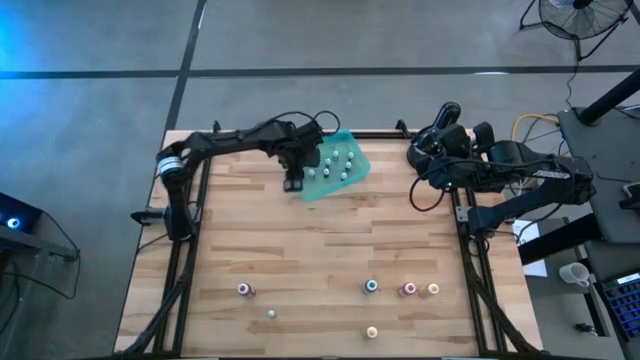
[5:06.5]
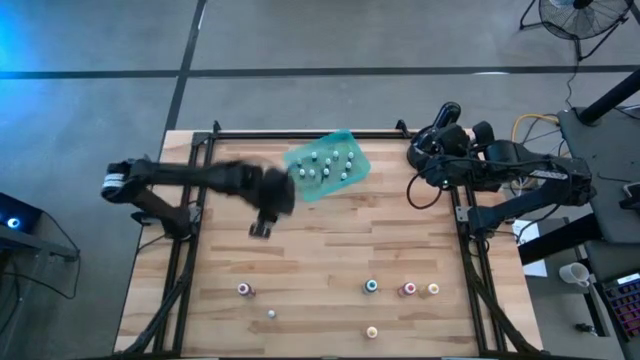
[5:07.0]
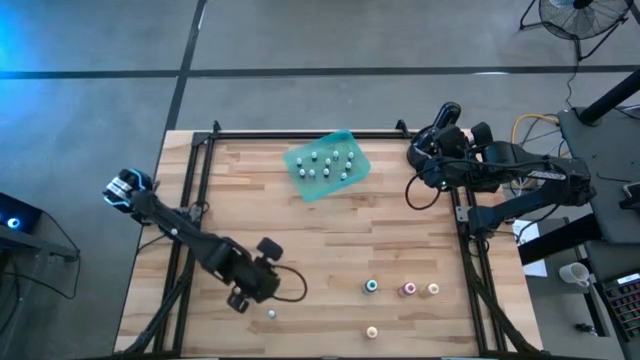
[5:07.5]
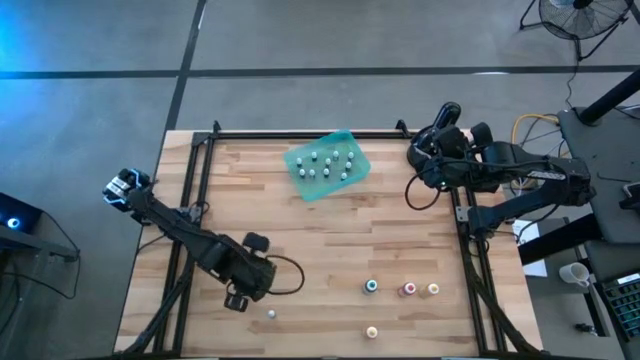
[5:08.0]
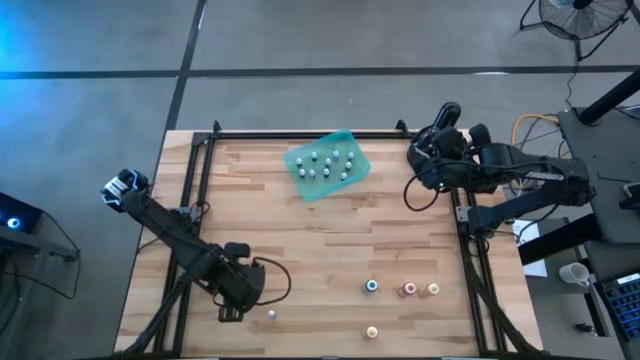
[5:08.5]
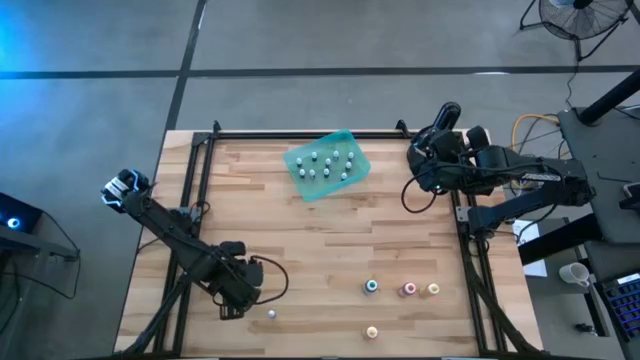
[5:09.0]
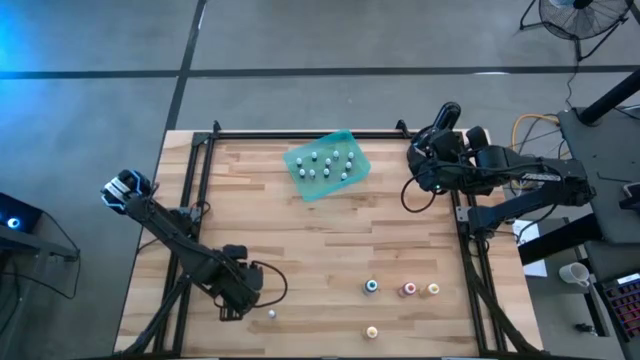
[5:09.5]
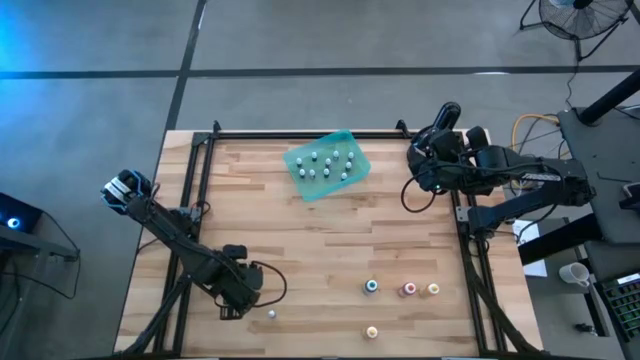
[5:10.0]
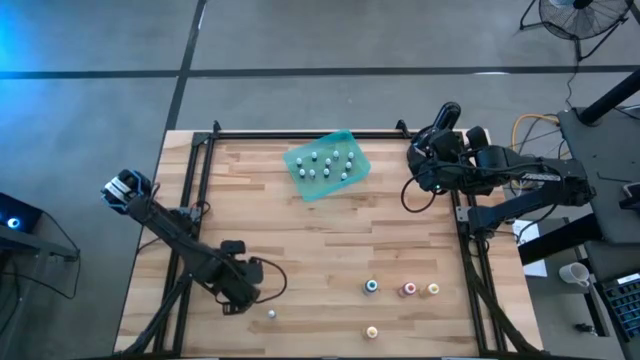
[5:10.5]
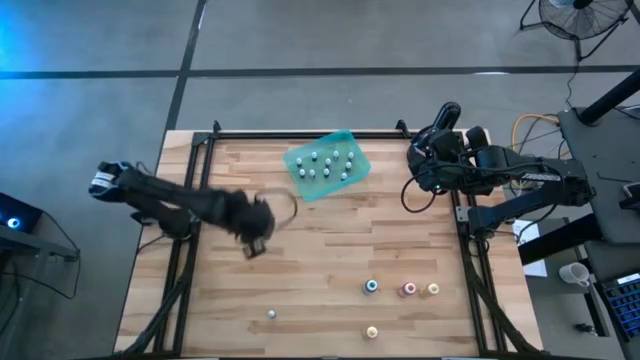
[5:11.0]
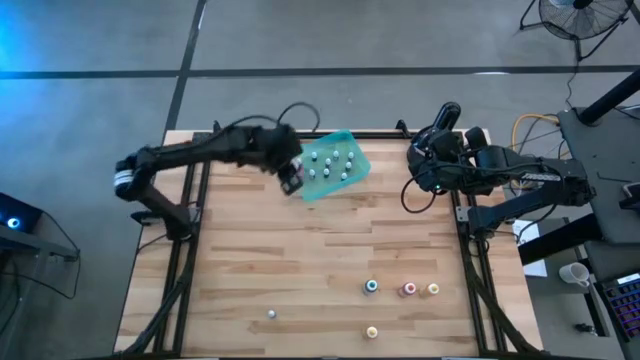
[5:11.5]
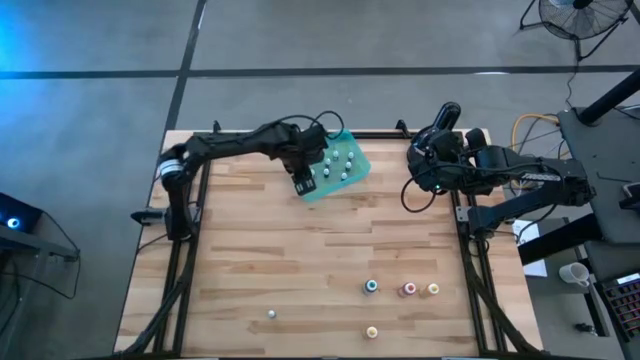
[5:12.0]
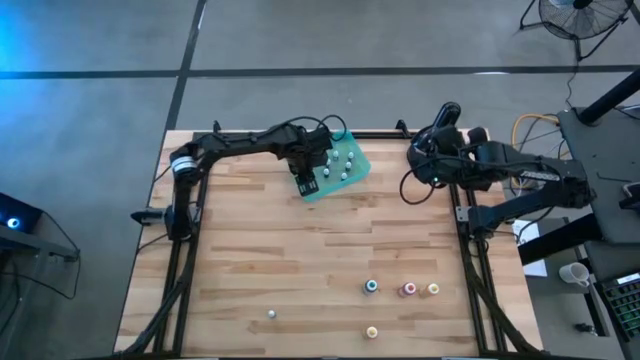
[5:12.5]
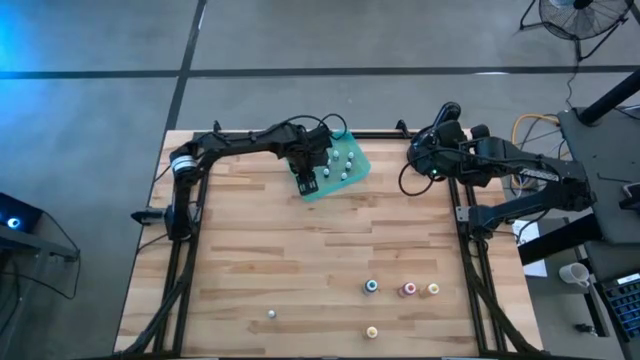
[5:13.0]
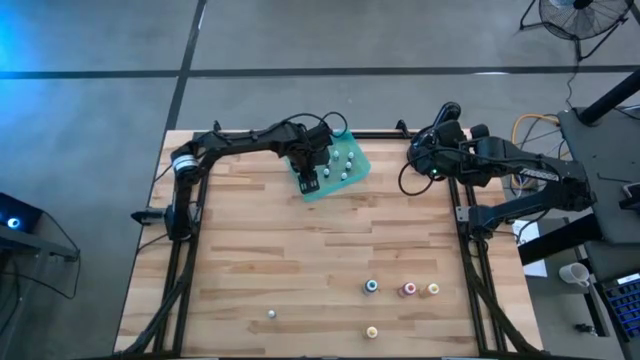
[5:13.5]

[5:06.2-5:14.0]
Task: Pick & Place food coloring
Put the orange small food coloring into the green bin

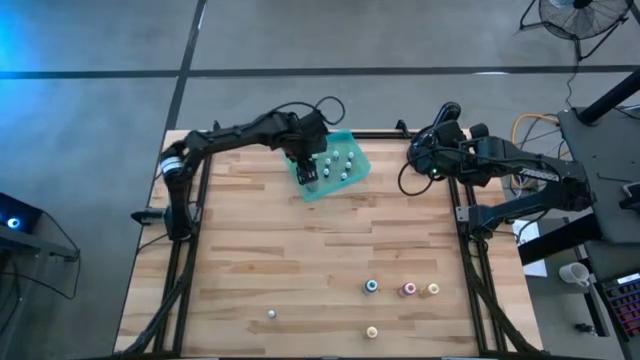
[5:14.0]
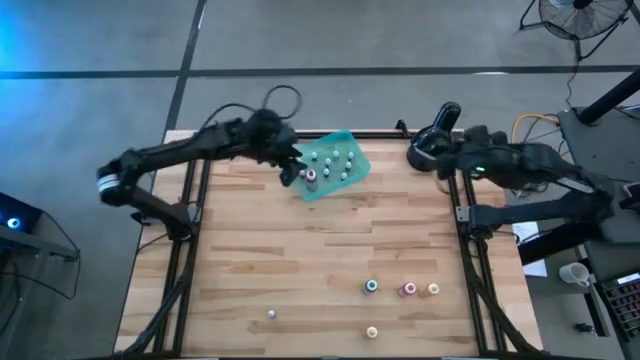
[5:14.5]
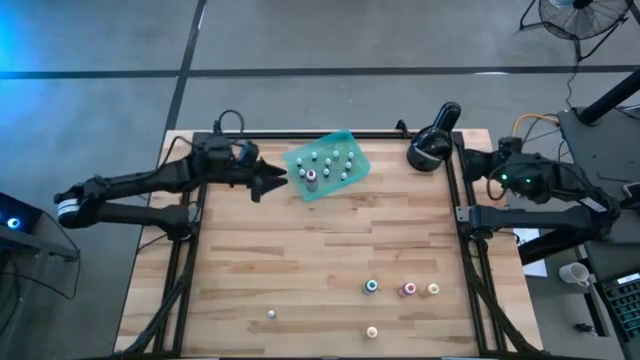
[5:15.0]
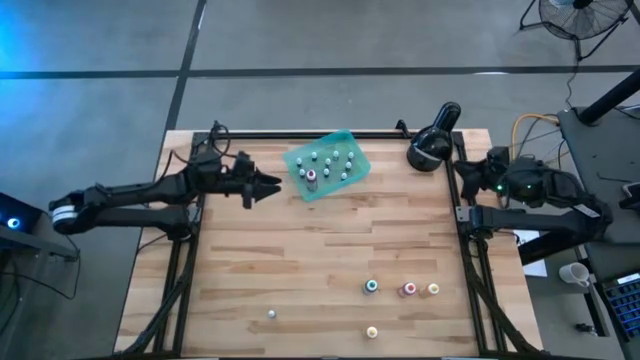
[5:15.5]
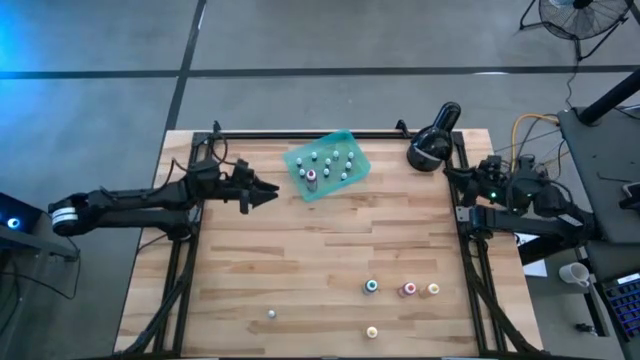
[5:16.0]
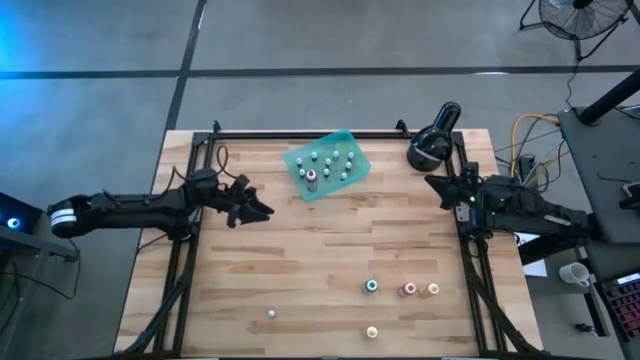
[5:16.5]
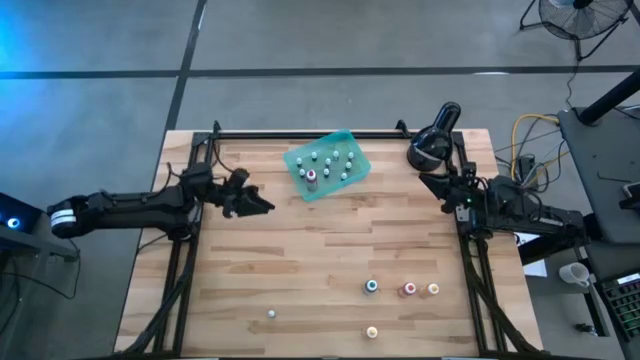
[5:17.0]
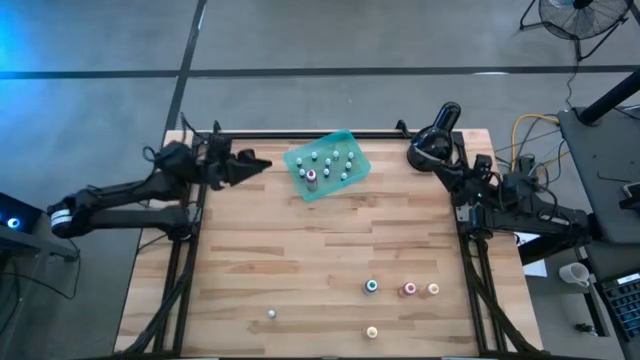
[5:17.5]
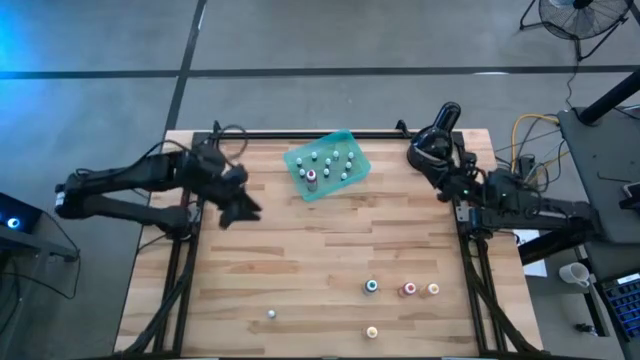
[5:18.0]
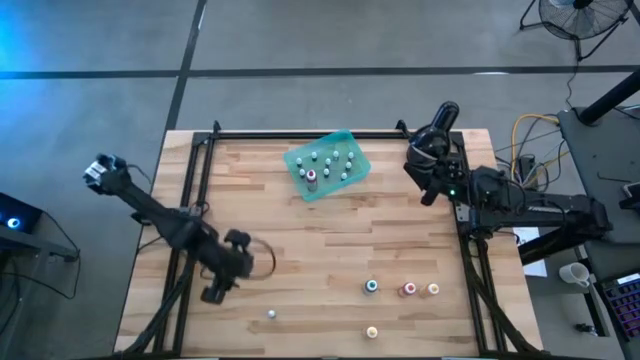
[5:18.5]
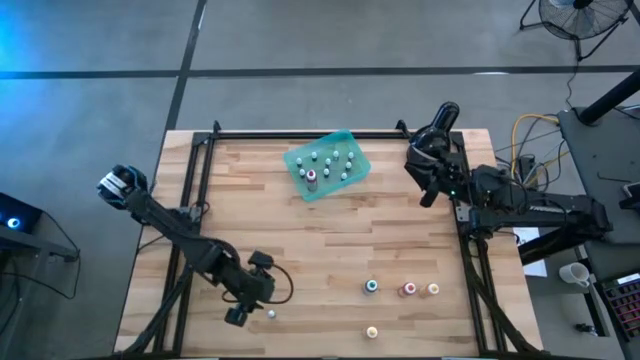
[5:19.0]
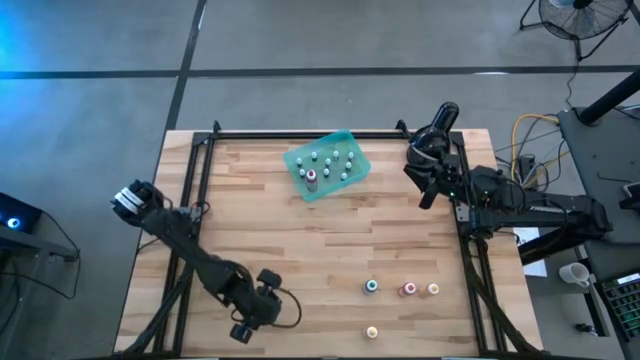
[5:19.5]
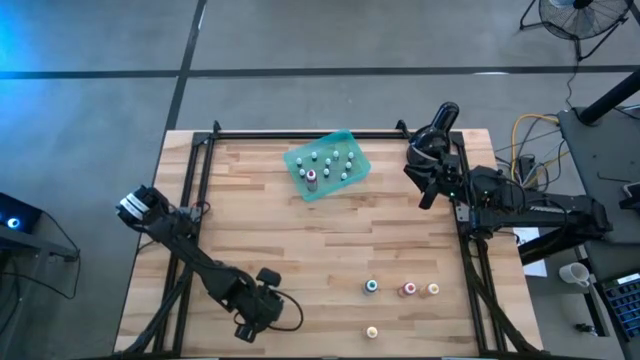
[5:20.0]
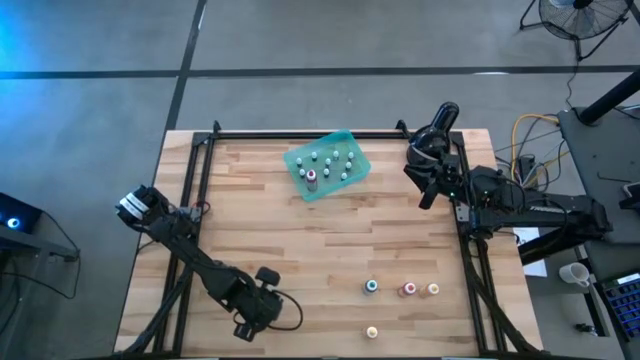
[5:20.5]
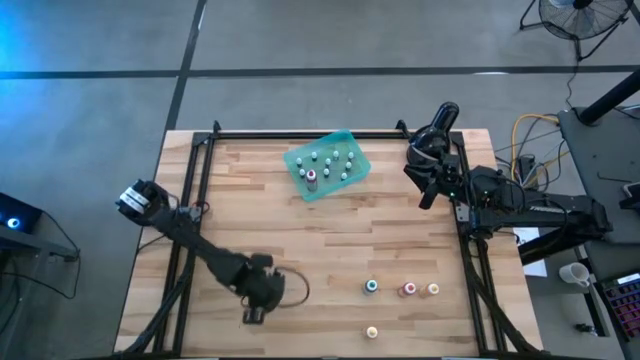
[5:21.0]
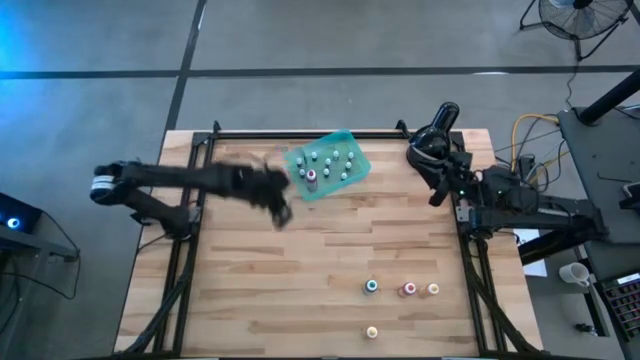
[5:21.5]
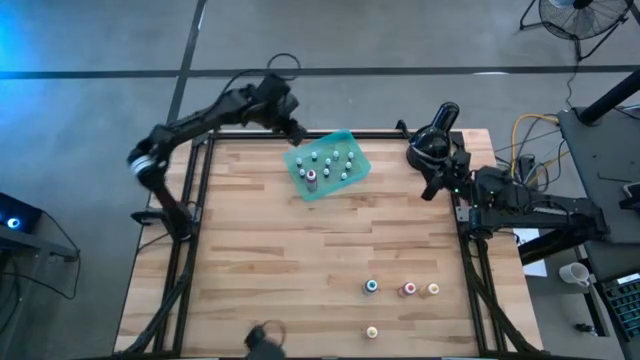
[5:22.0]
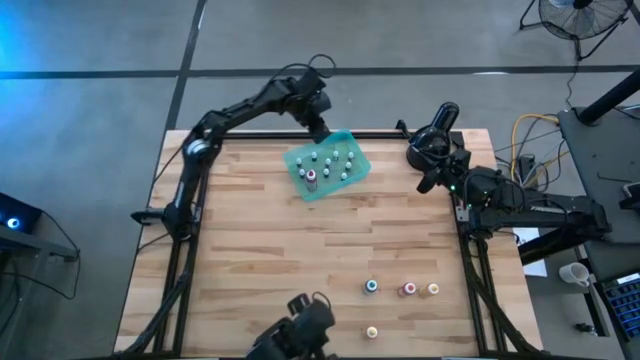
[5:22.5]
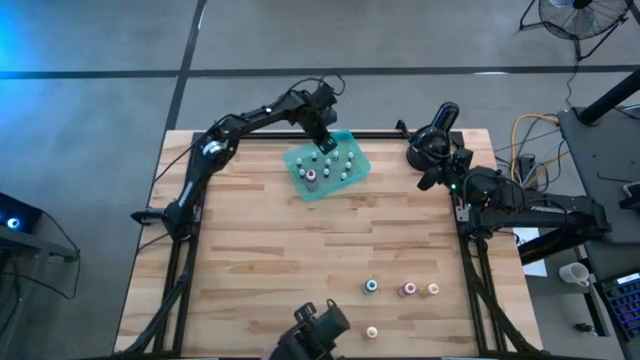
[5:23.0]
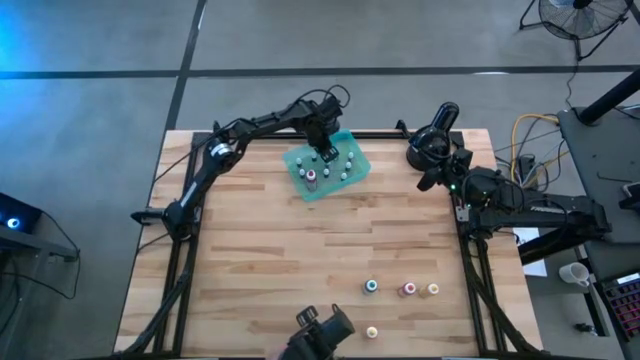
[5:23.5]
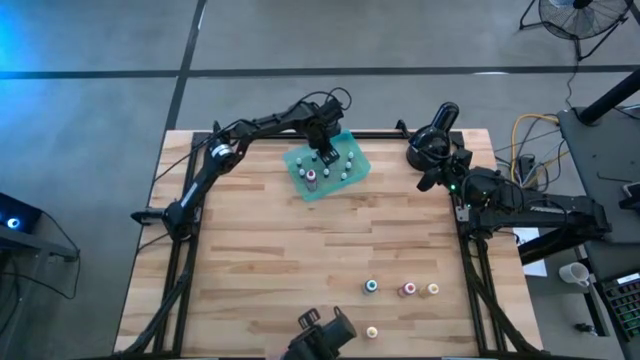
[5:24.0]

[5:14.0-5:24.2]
Put the red big food coloring into the green bin

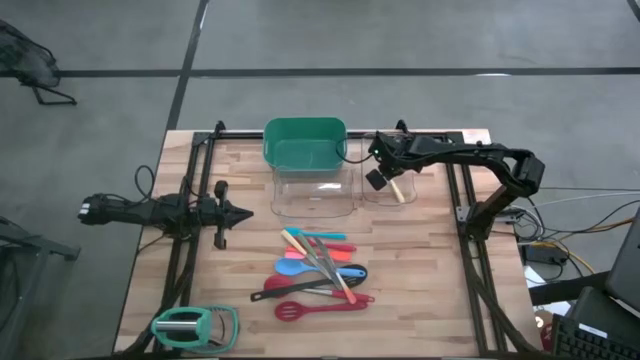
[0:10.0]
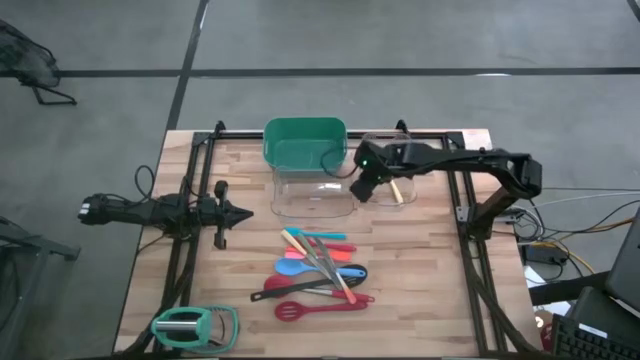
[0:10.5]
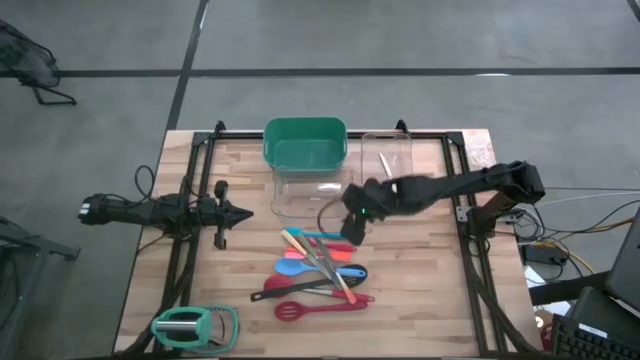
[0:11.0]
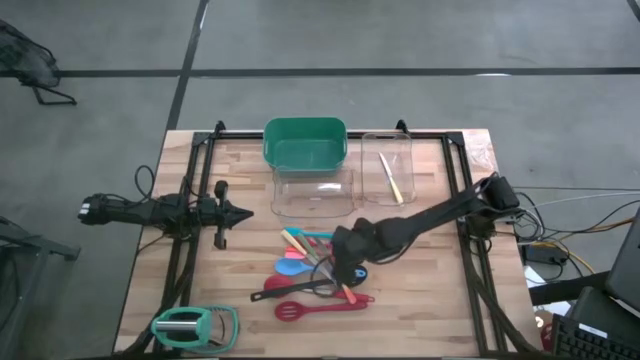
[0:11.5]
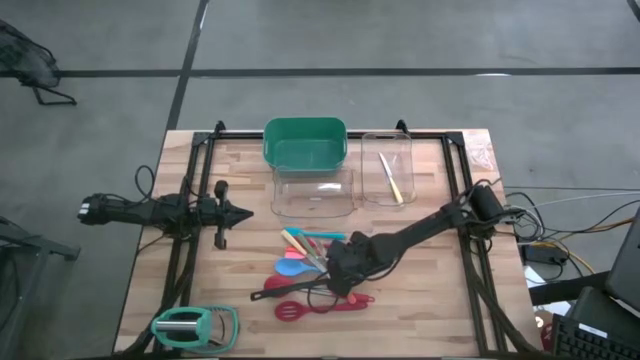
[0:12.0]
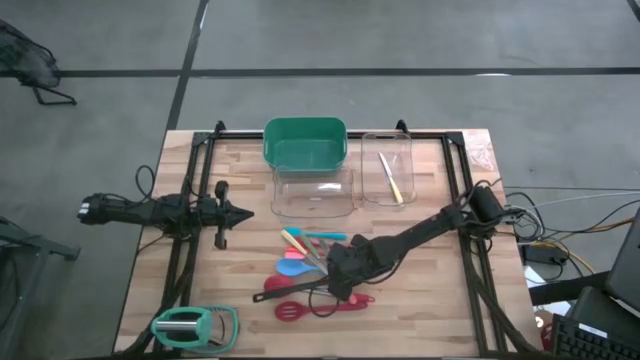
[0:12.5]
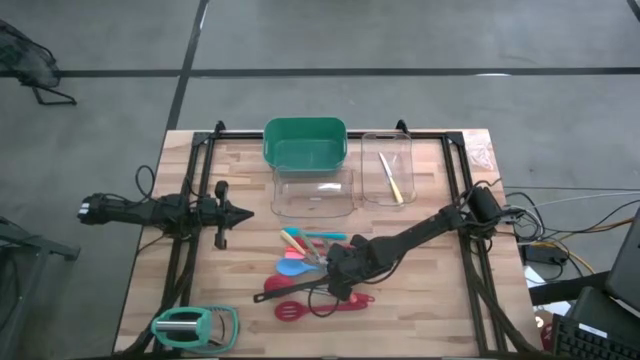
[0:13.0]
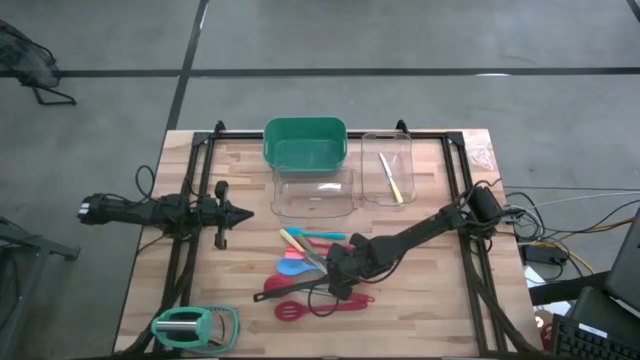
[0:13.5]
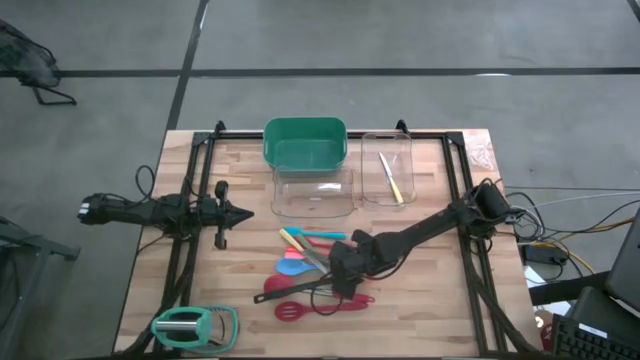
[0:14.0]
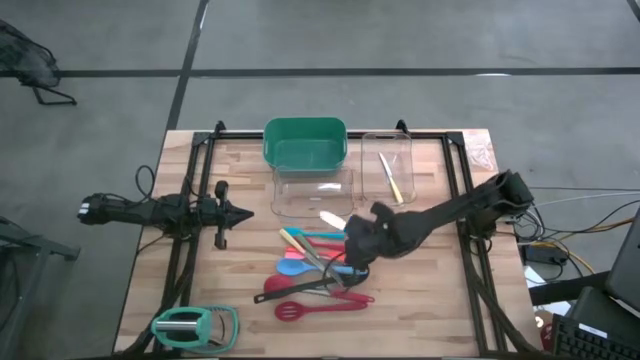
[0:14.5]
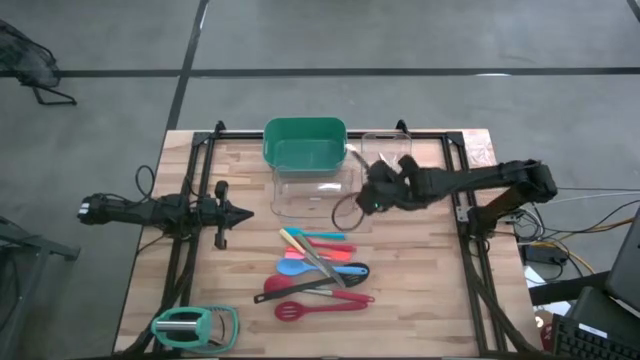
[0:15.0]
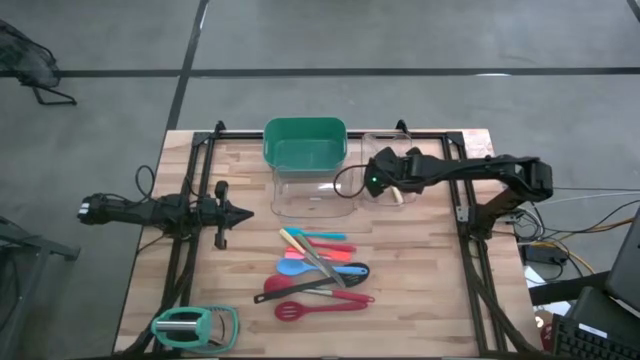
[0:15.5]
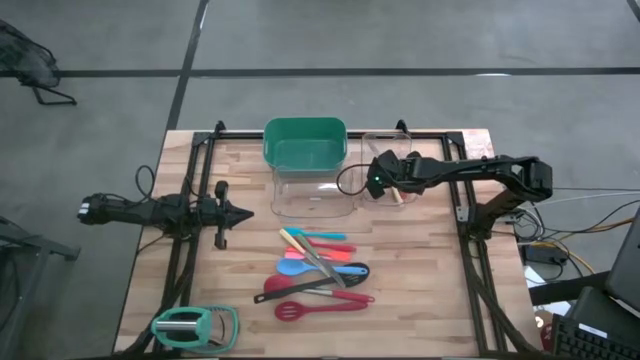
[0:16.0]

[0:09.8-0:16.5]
Task: Pick & Place Kitchen Items
Put the orange knife into the right transparent bin
